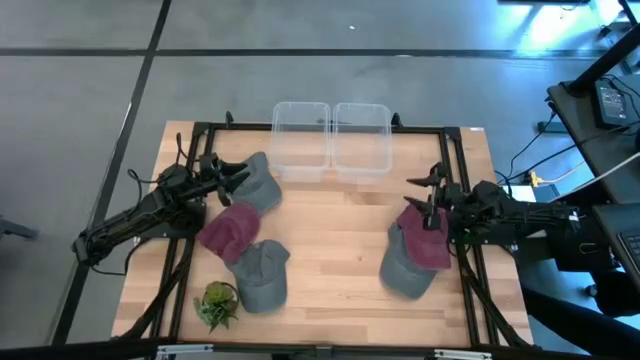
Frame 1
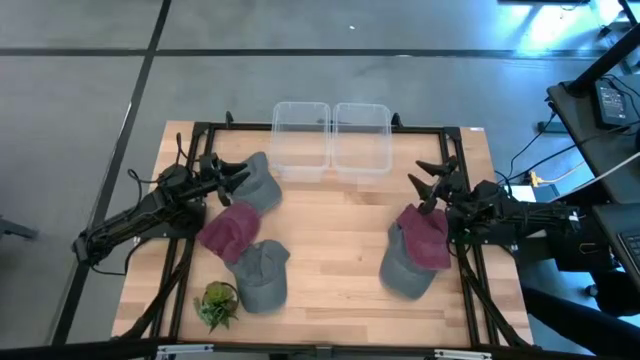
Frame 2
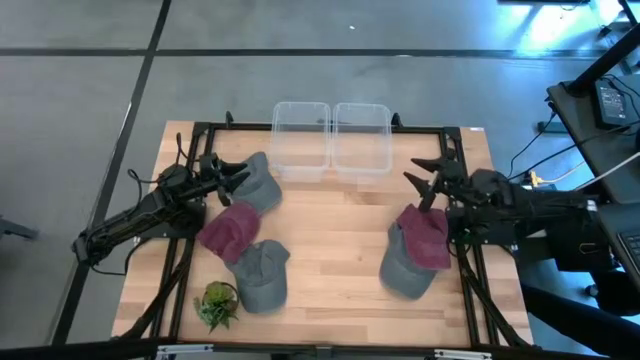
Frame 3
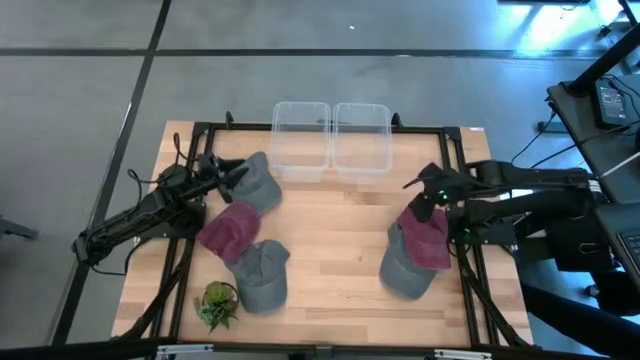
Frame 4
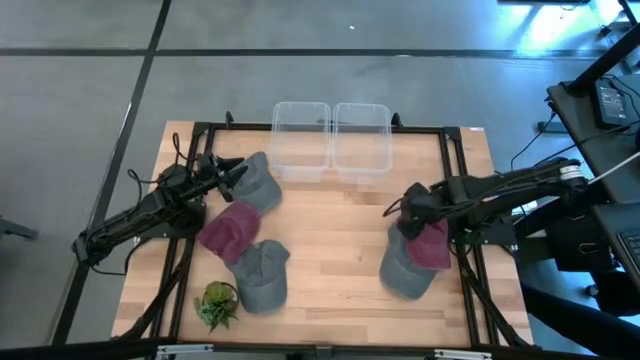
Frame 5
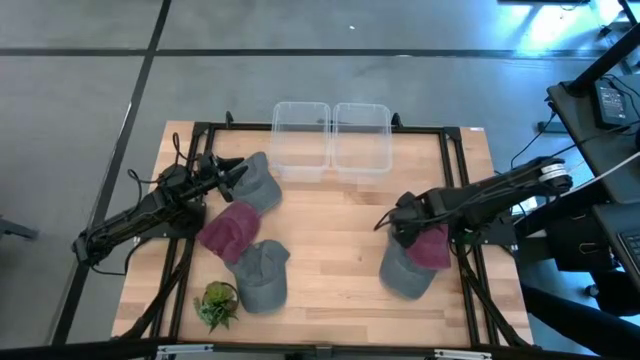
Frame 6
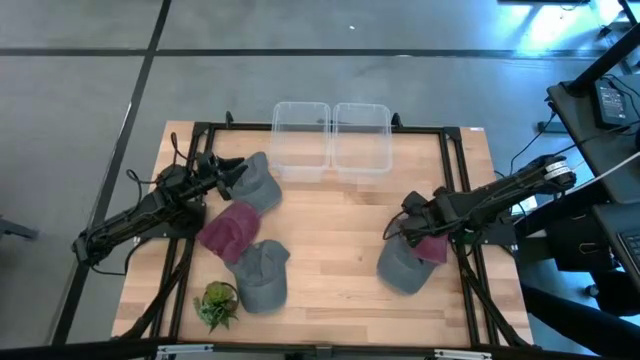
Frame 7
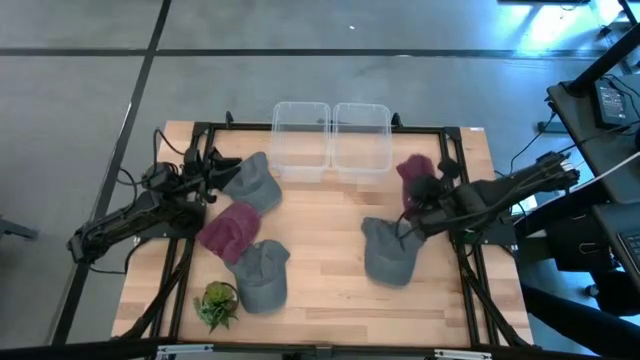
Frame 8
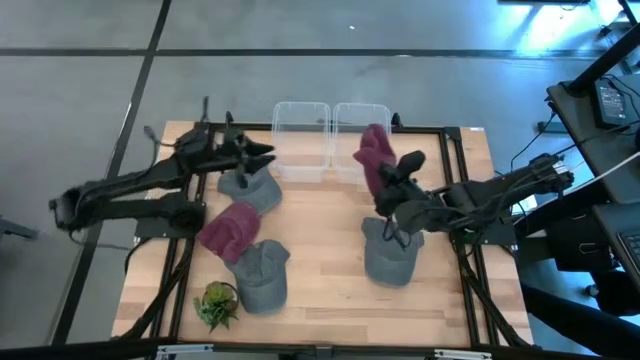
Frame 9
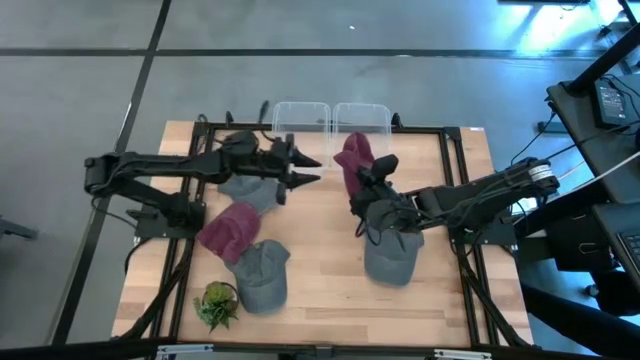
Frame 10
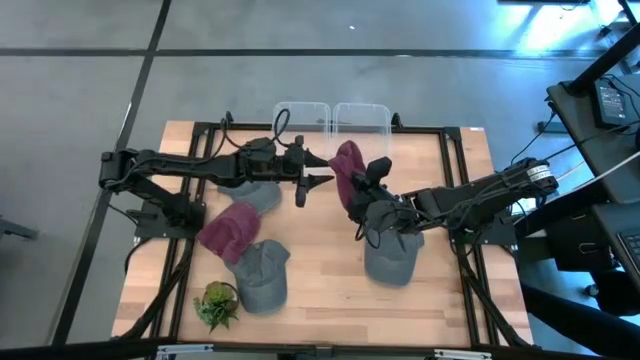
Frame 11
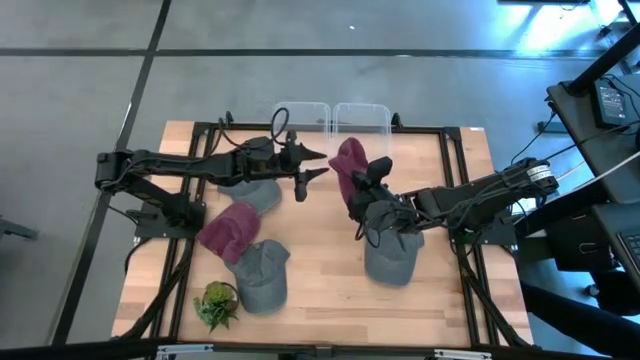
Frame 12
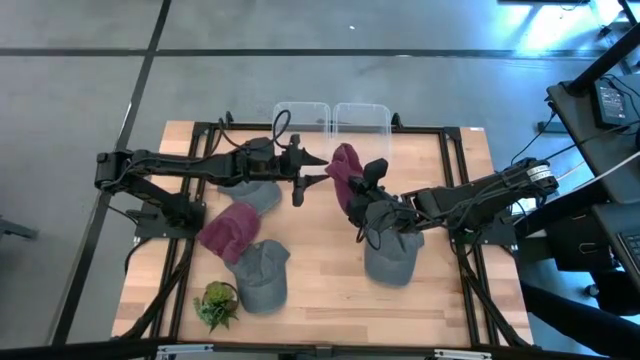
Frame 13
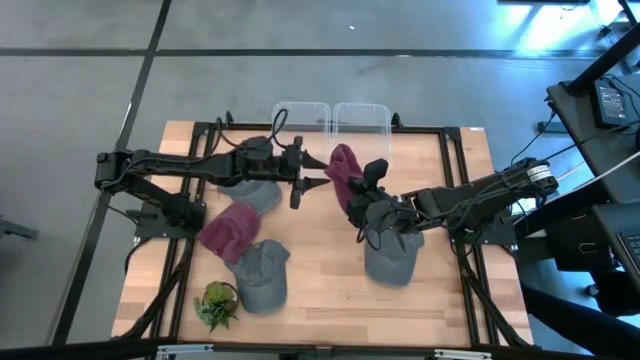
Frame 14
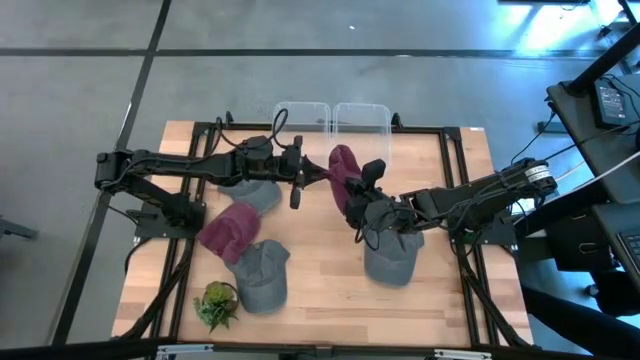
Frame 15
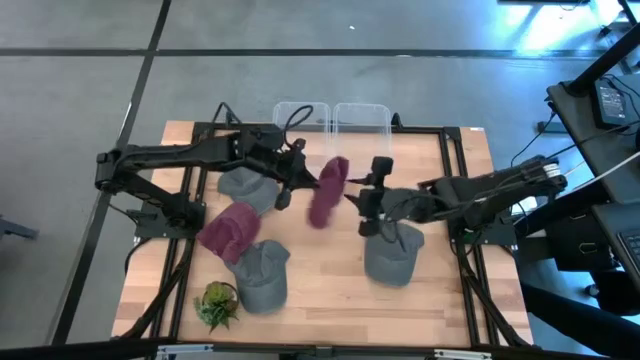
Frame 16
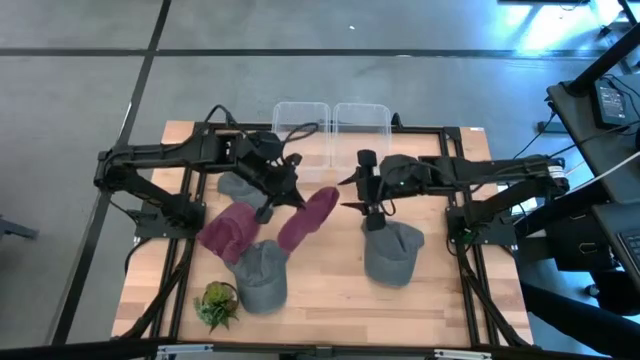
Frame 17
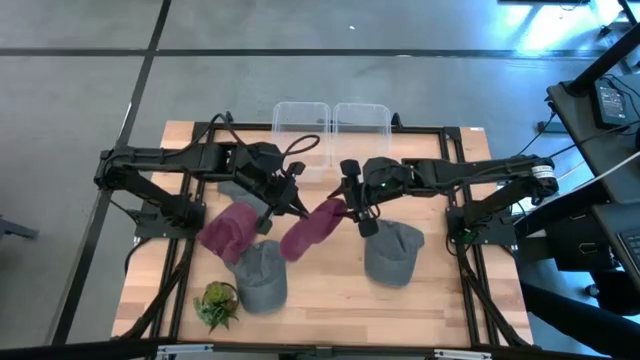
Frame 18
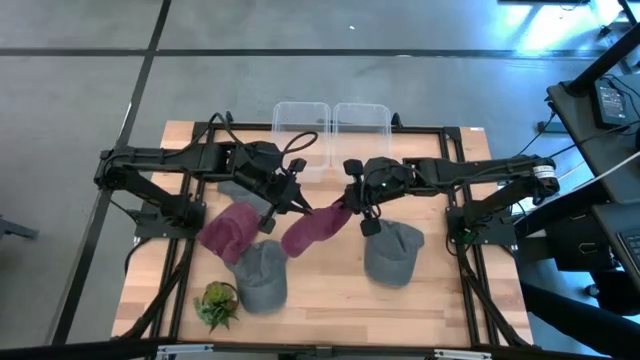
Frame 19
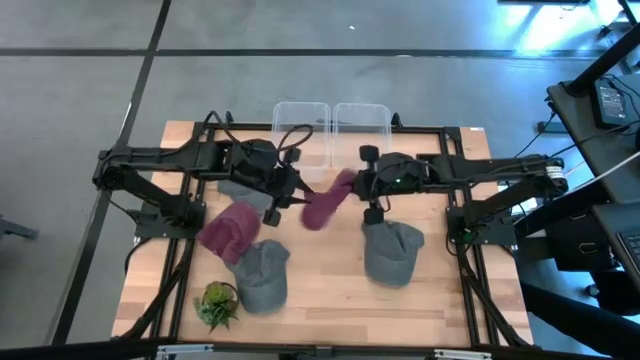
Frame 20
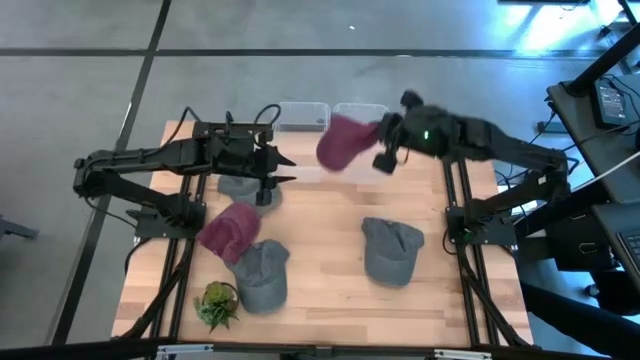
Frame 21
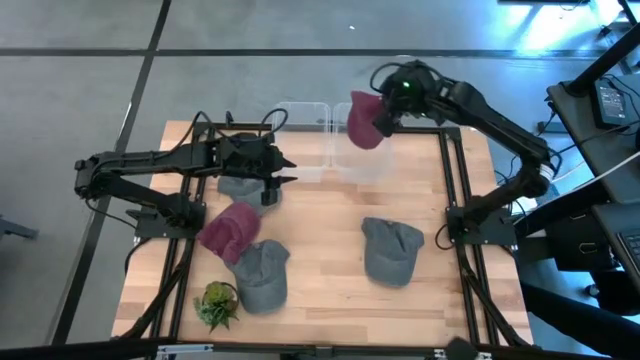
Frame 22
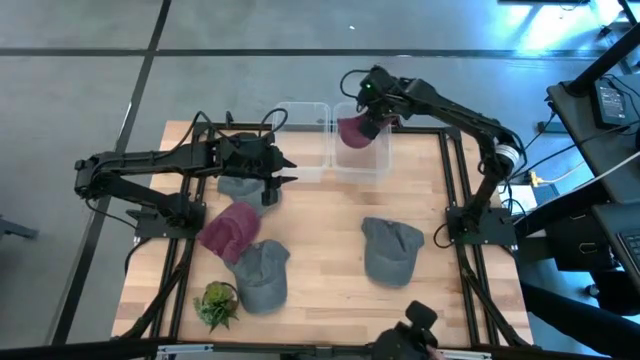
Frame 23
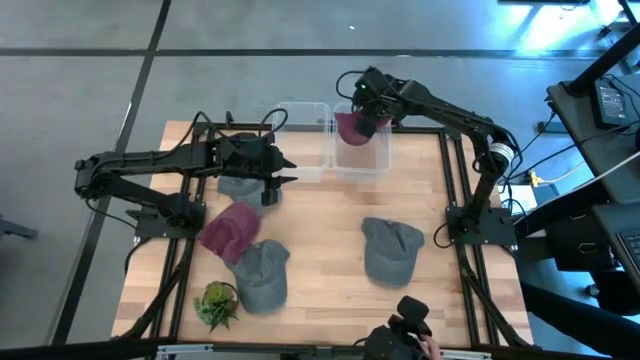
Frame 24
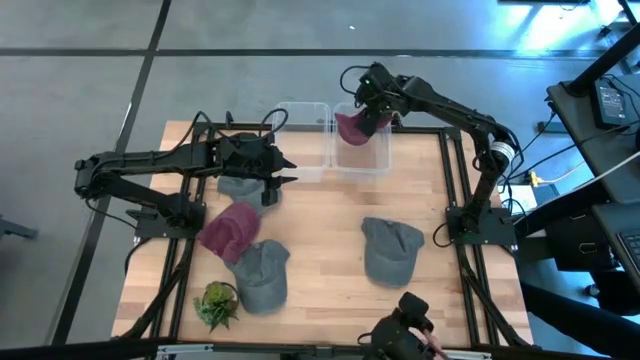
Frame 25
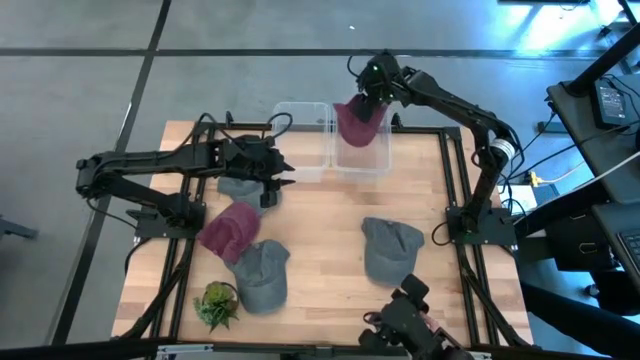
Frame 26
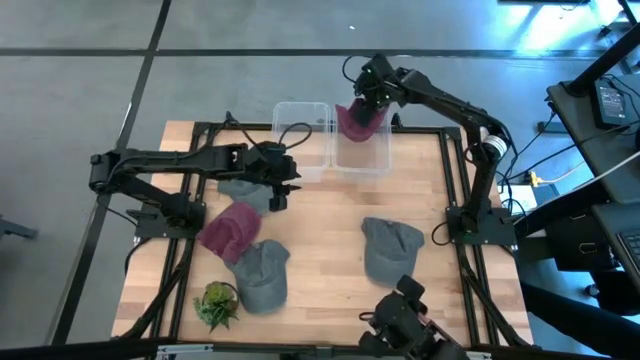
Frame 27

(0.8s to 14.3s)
Task: Pick & Place hat
Put the red cap into the right transparent bin

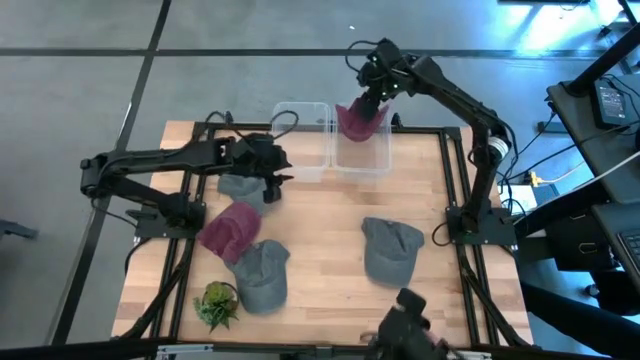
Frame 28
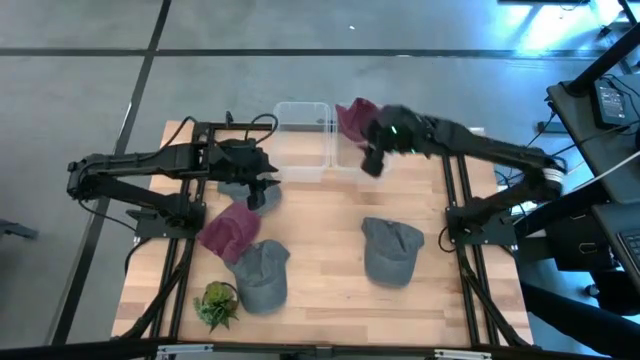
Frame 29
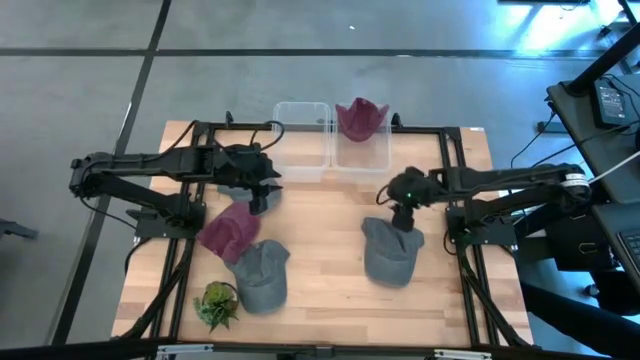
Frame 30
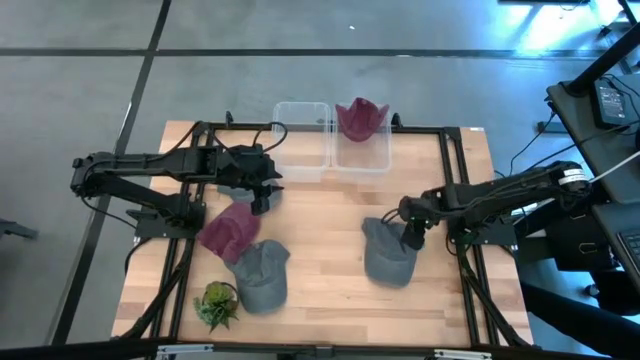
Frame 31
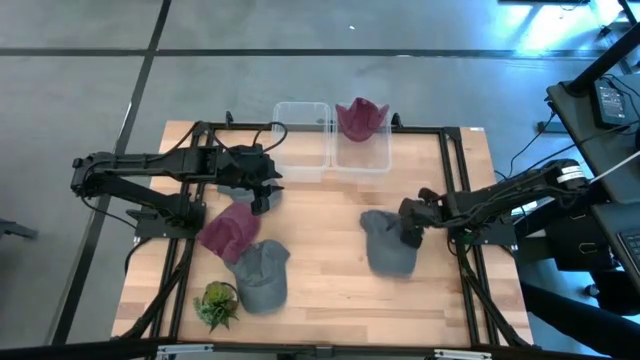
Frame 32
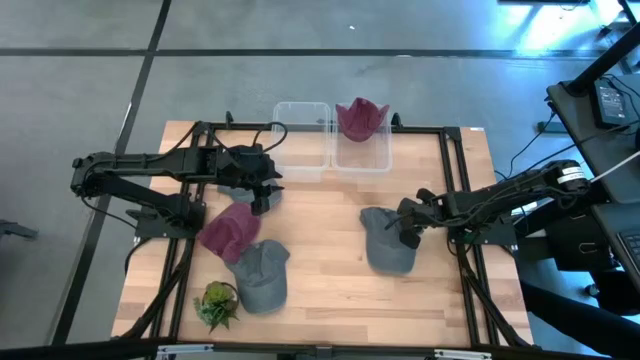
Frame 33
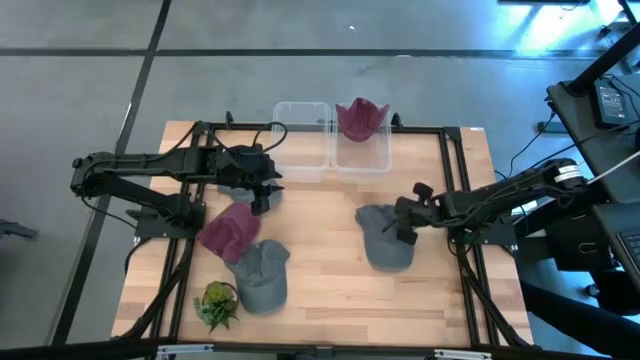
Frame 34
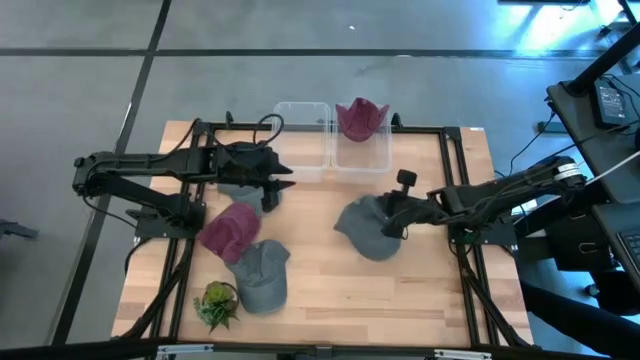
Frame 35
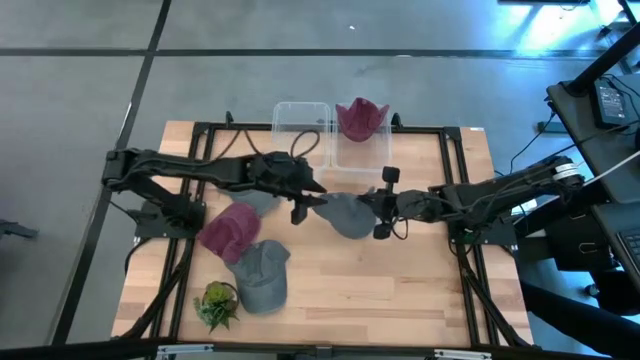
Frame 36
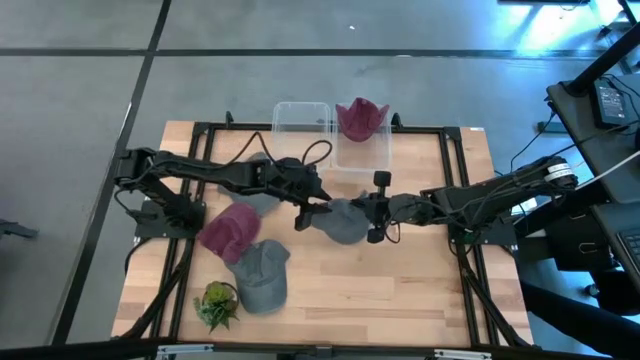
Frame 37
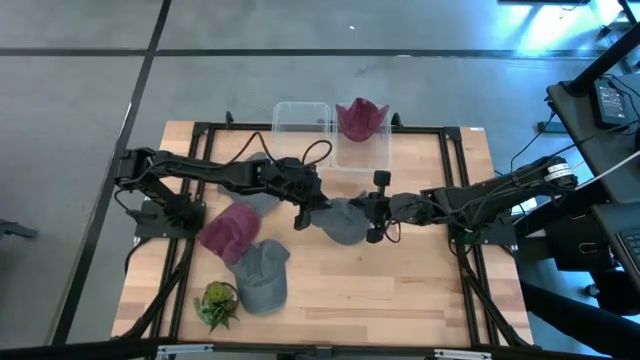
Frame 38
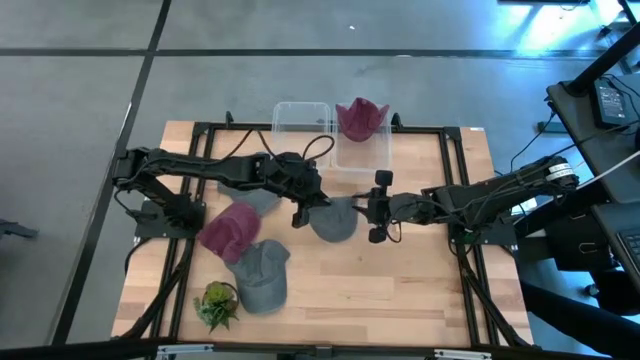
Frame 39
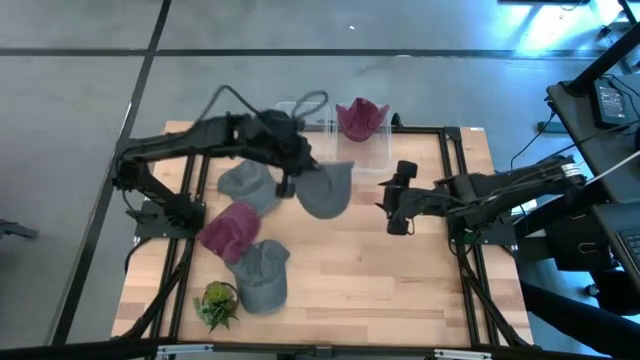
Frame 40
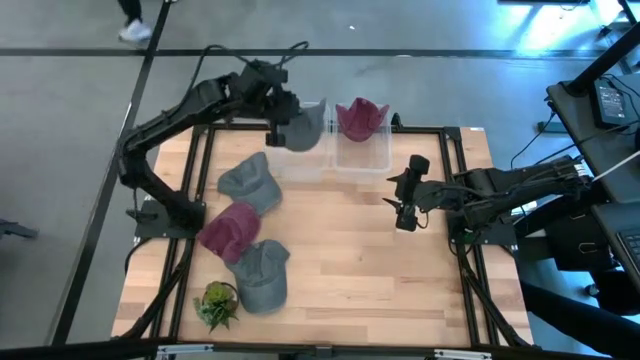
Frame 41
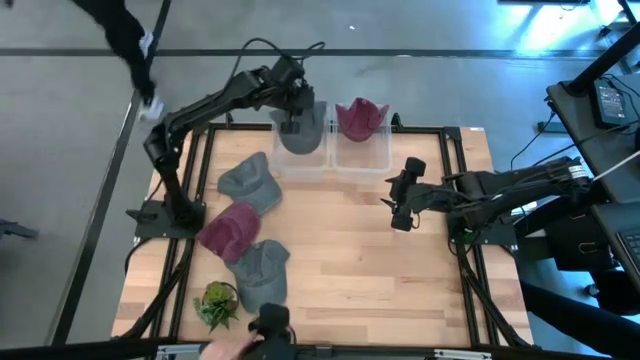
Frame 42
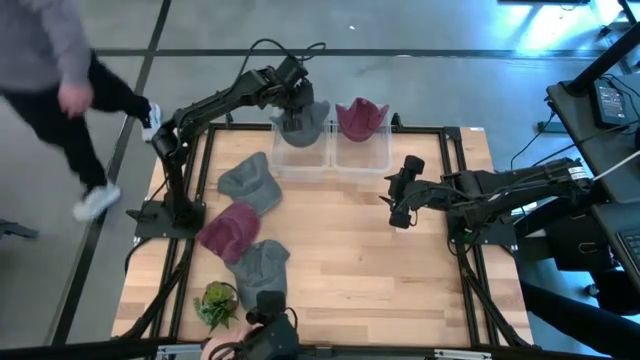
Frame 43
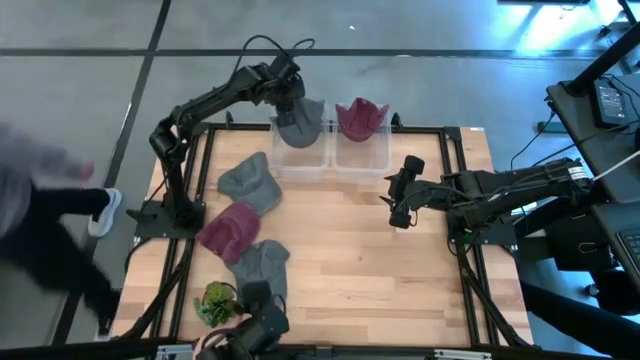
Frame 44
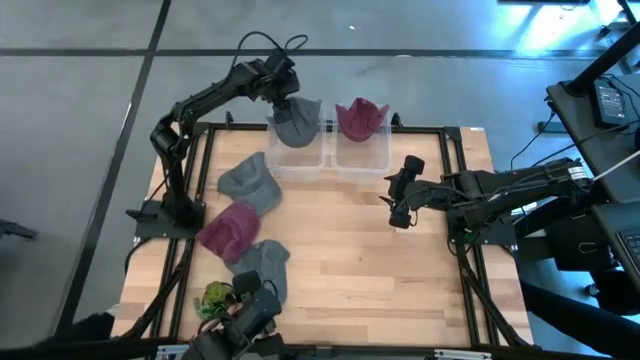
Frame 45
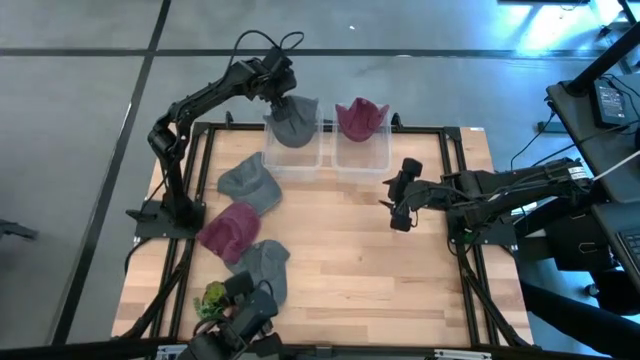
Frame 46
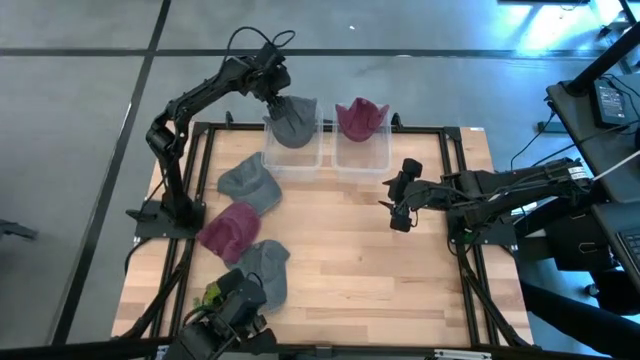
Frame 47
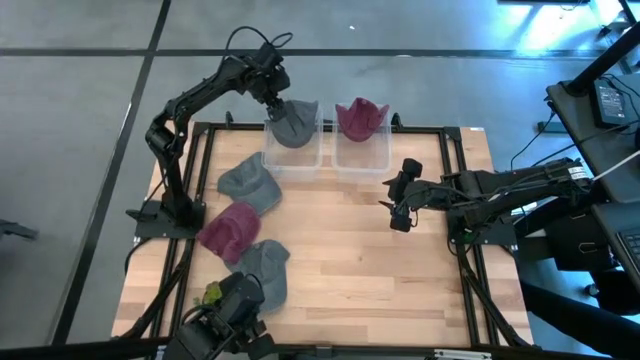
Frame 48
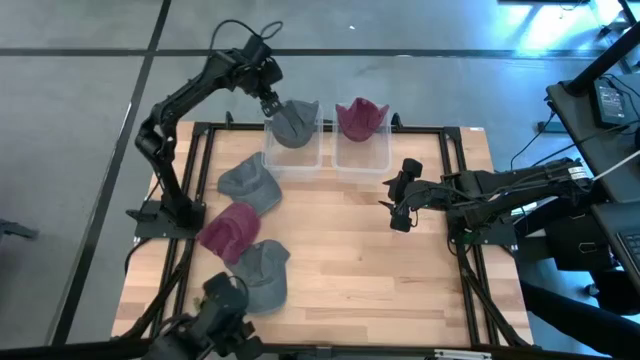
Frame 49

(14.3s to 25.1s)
Put the bottom right gray cap into the left transparent bin
